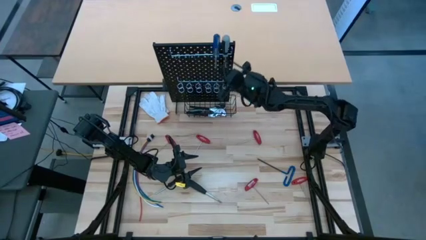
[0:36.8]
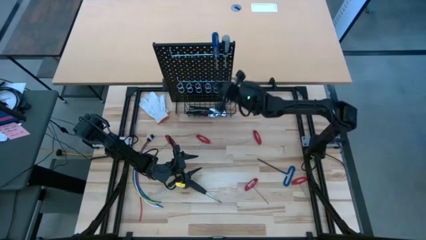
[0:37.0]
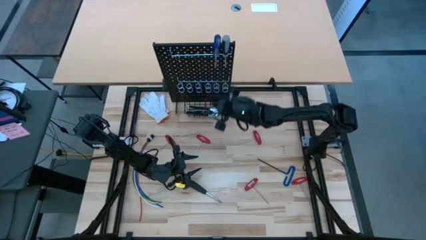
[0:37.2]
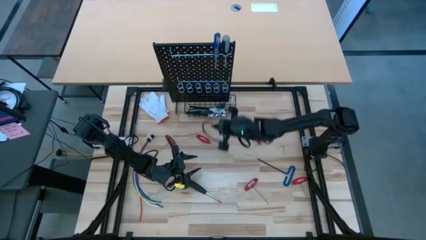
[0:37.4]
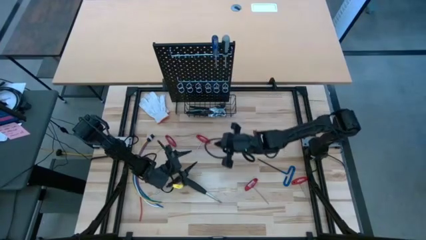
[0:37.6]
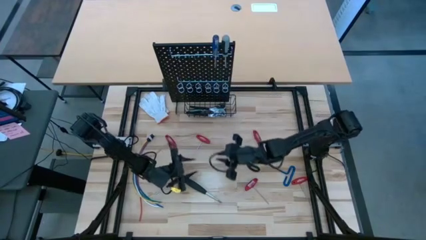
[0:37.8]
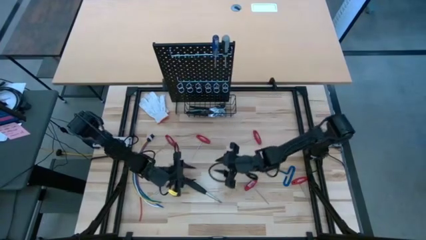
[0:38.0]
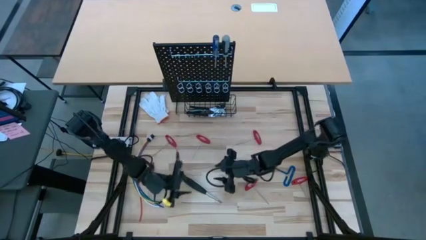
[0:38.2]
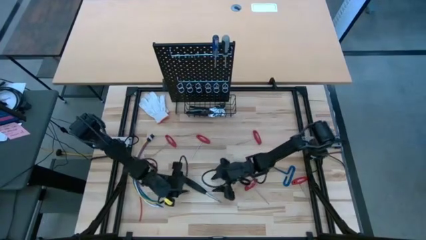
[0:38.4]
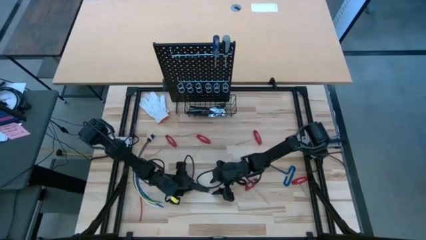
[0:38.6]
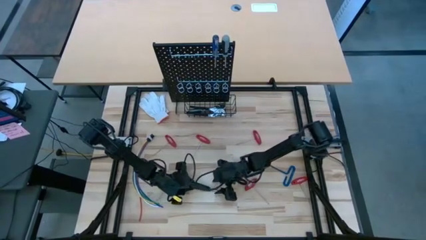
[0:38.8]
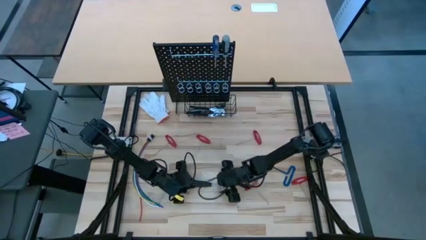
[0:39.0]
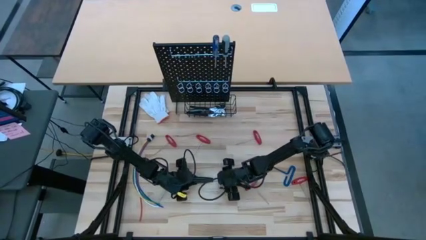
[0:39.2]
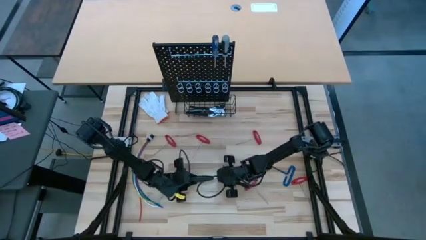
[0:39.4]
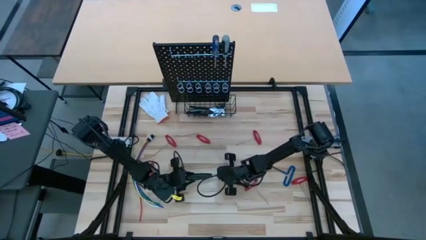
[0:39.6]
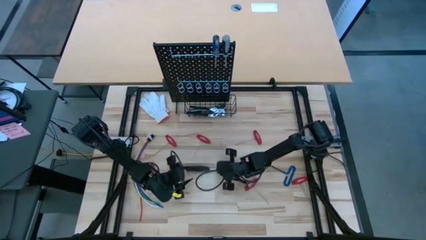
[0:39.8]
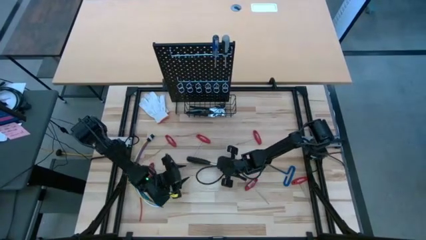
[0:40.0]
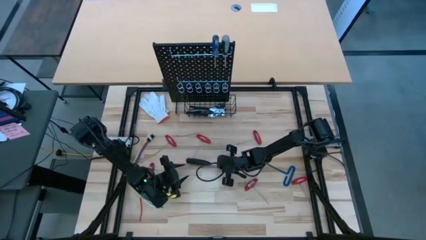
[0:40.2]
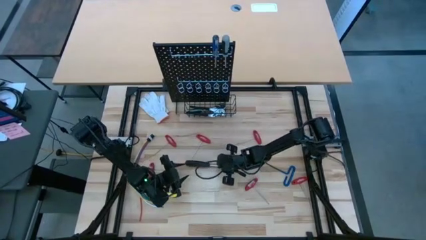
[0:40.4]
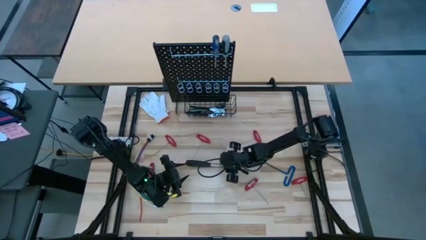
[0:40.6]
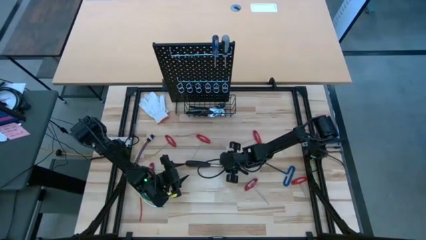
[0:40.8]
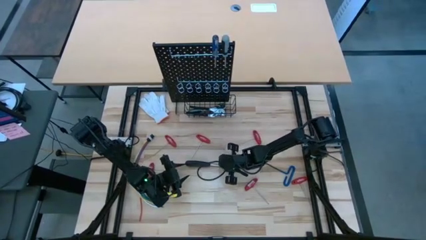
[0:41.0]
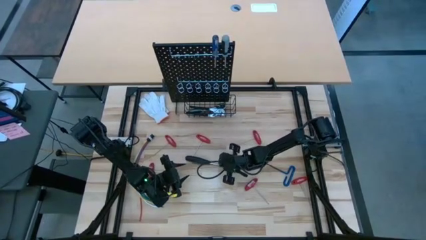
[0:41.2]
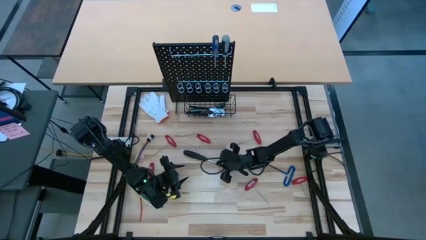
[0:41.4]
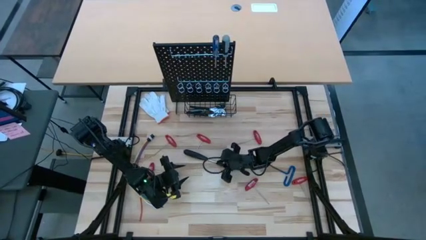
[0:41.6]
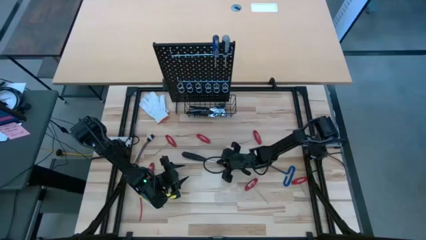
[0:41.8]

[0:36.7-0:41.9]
Task: Hang tools onto peg board
Hang the black screwdriver on the black pegboard

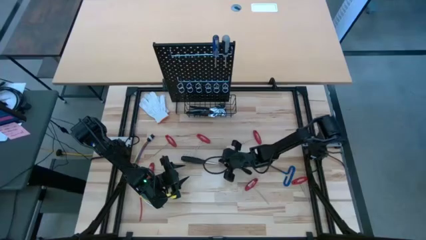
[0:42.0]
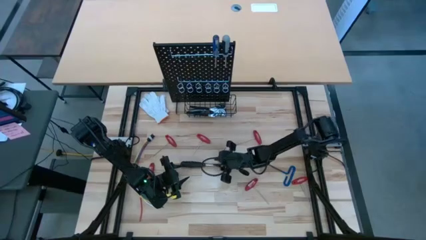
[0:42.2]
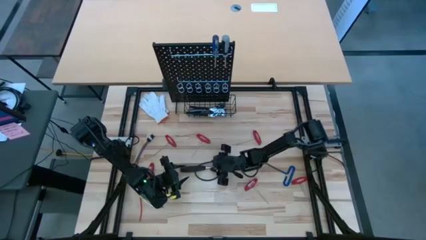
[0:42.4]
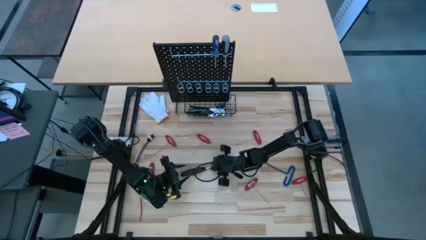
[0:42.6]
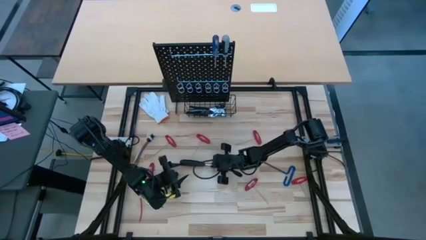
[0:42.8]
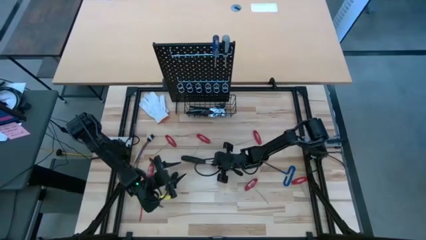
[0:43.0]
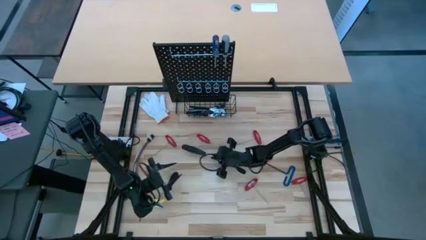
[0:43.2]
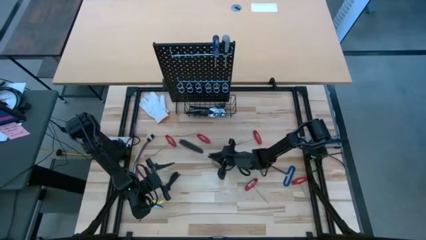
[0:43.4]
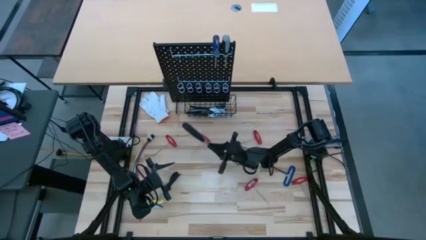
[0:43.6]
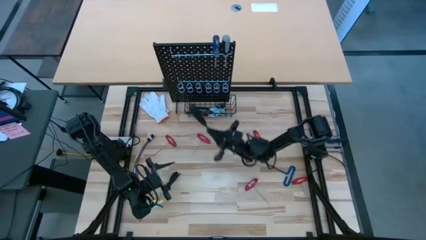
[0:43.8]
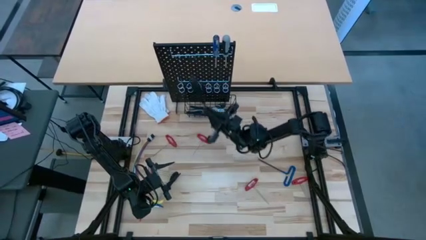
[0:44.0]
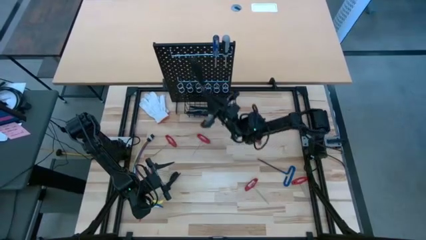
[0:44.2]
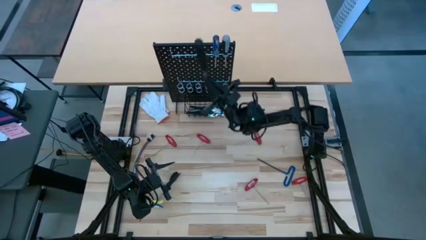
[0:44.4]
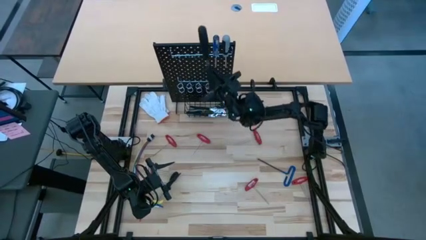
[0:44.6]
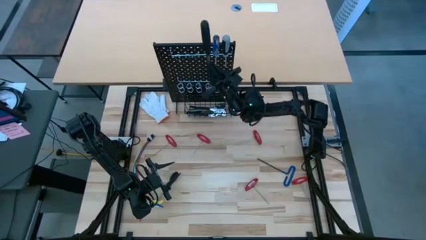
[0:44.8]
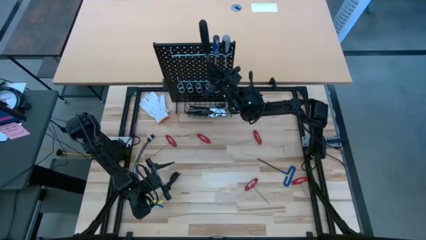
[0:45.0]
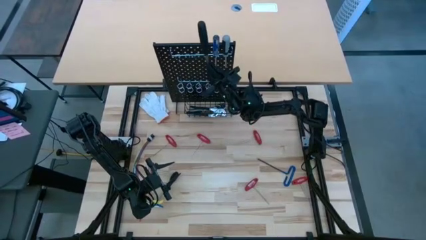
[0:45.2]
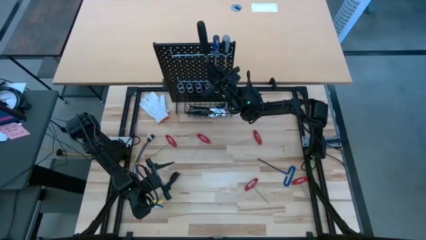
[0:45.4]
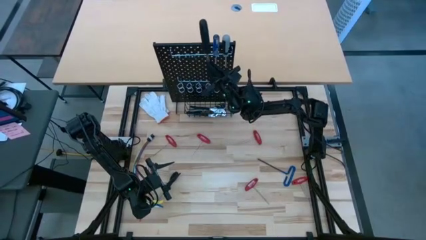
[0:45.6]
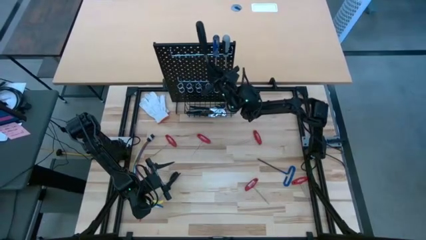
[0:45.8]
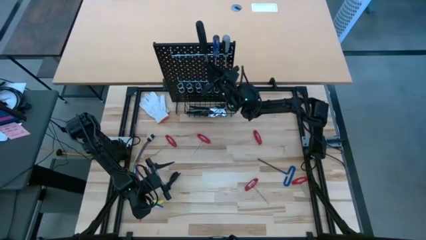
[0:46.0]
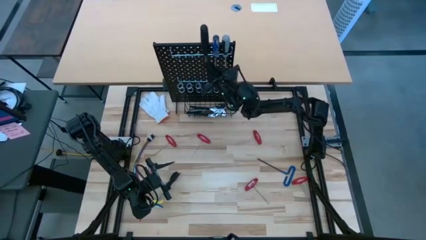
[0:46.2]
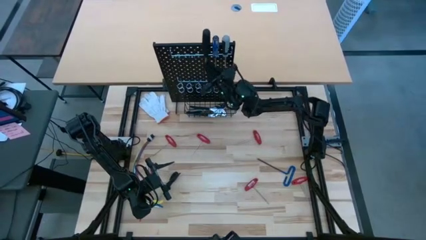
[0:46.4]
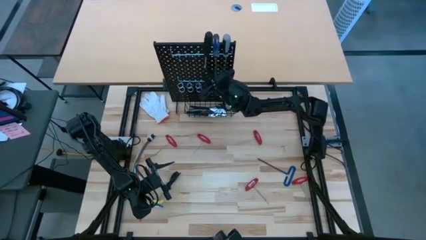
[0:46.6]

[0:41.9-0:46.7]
Hang the black screwdriver on the black pegboard

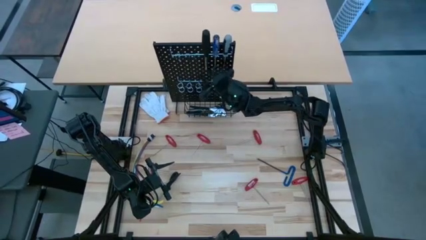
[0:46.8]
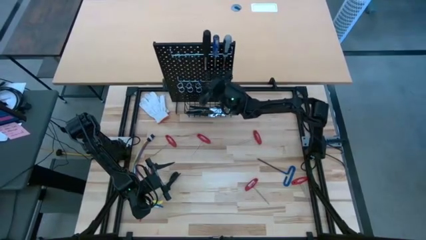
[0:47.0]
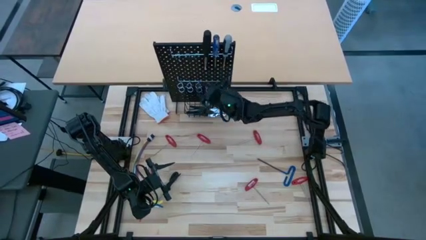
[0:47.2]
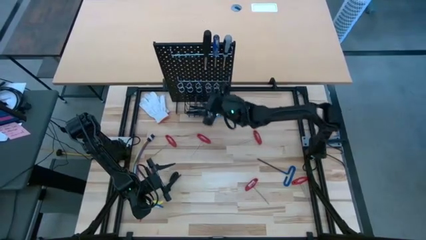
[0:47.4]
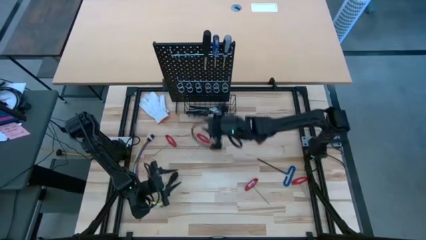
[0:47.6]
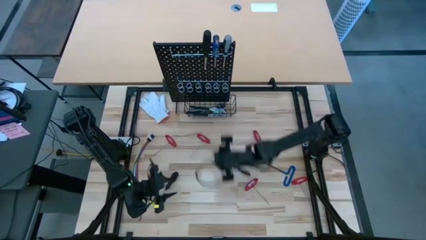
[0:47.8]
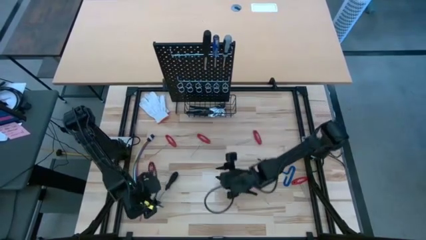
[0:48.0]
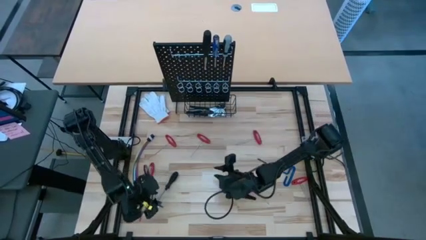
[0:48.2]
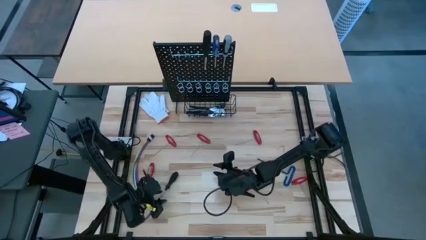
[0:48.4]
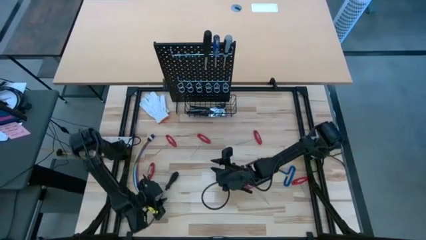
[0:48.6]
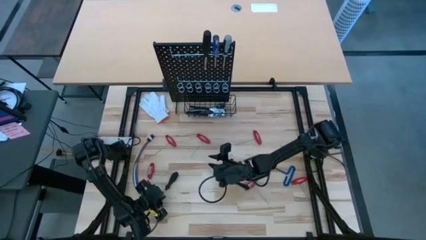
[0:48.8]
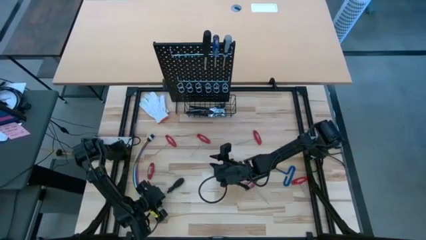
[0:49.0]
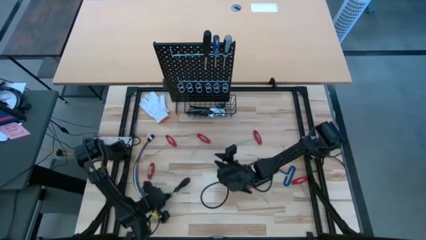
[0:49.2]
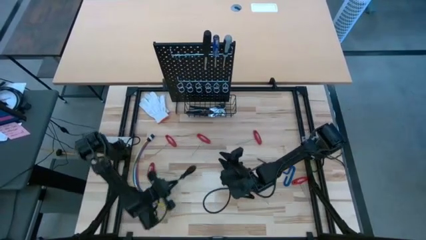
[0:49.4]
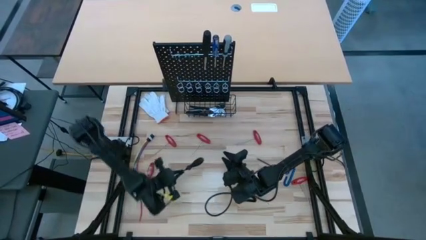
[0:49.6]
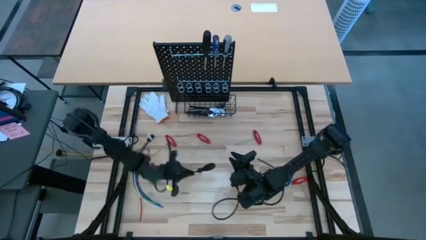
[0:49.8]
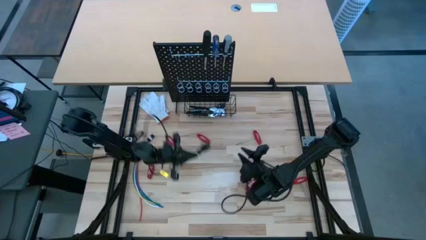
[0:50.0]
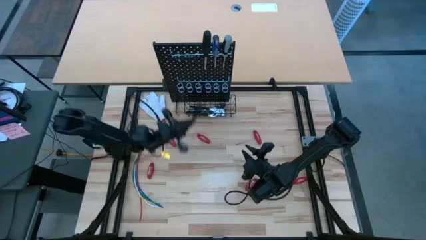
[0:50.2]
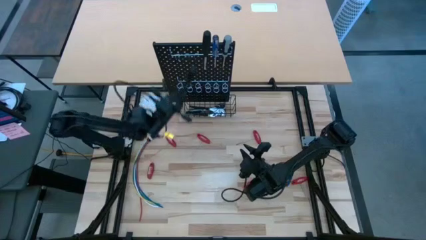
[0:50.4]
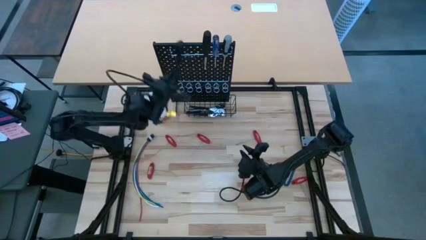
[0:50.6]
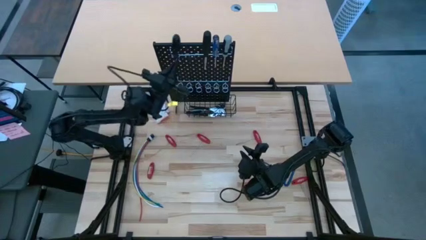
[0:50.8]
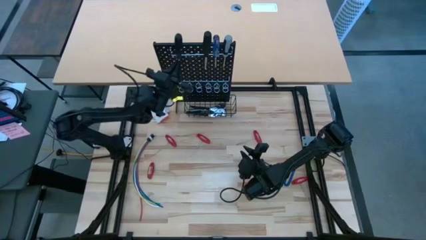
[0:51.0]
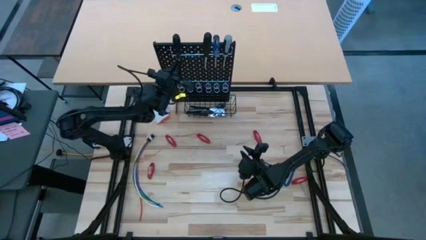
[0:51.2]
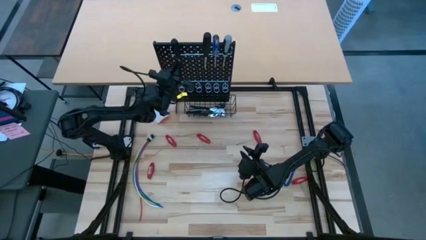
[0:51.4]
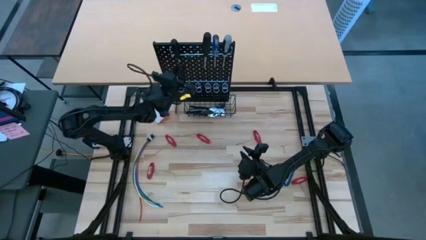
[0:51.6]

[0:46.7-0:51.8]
Hang the black screwdriver on the black pegboard

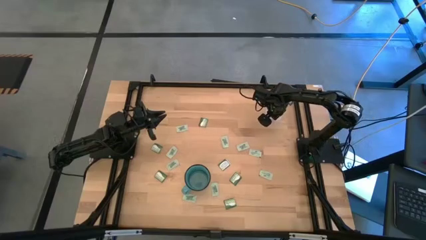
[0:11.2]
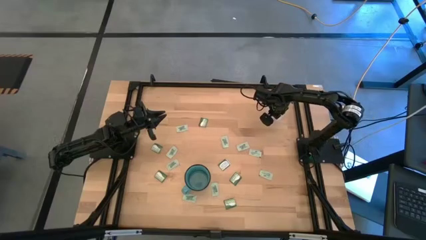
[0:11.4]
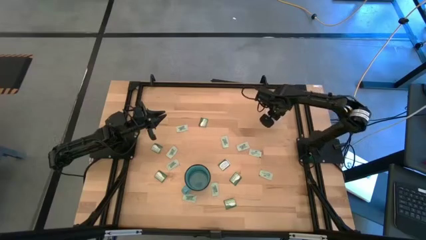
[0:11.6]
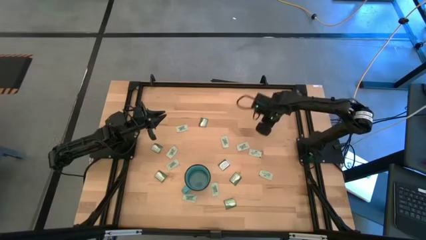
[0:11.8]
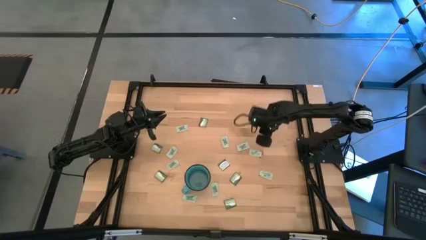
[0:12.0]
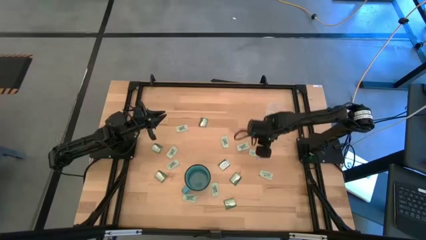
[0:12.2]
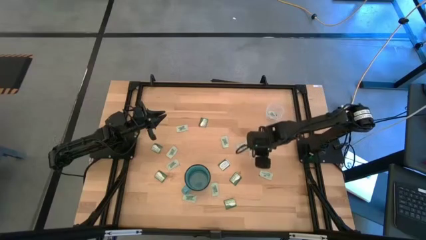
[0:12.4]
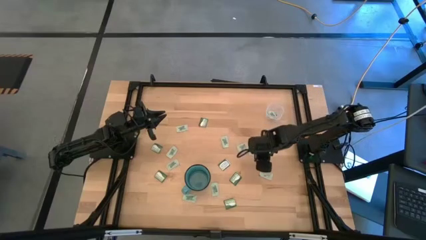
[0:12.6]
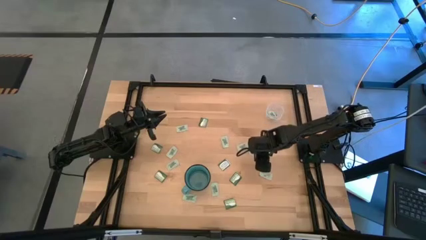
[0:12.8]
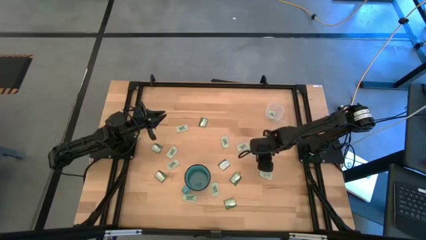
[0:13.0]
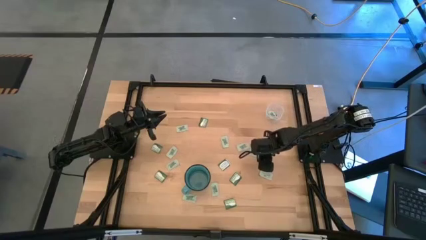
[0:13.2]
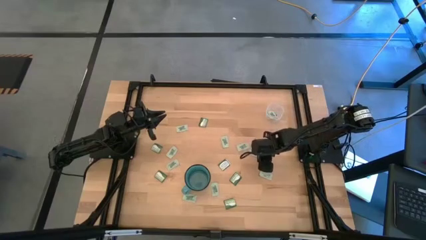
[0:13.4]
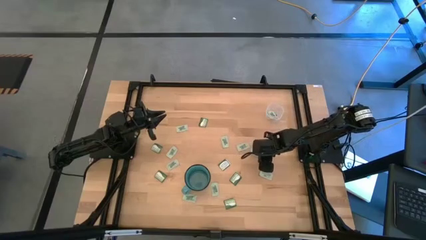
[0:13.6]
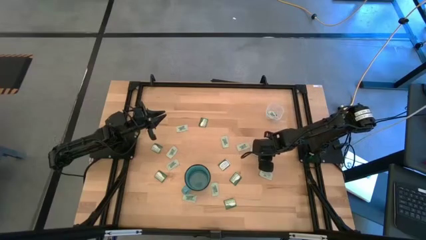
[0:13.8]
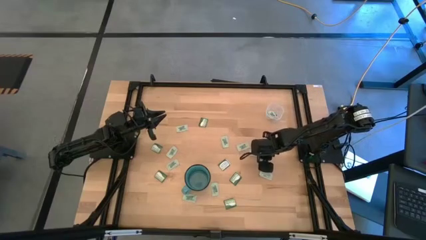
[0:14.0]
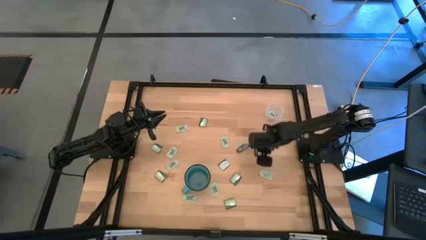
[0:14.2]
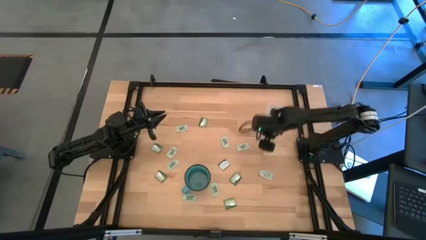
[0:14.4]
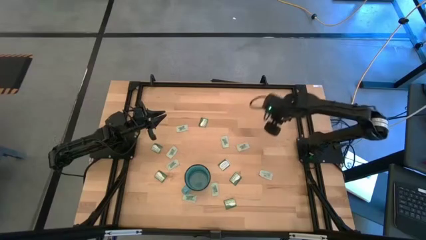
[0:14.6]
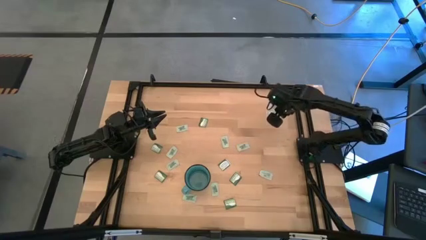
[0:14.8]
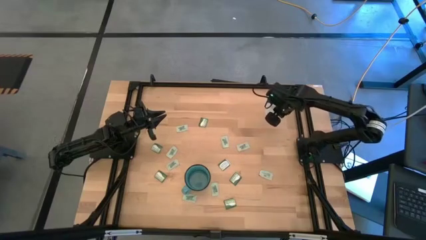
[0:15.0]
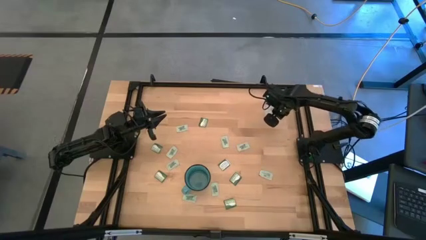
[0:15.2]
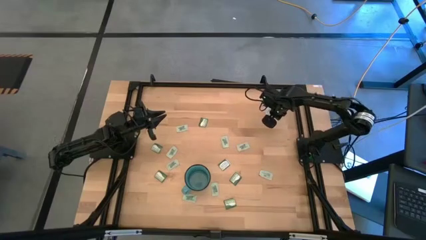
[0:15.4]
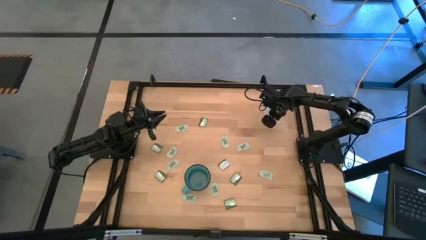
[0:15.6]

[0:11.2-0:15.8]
Task: Pick and place items into bin
Put the stevia packet into the transparent bin
